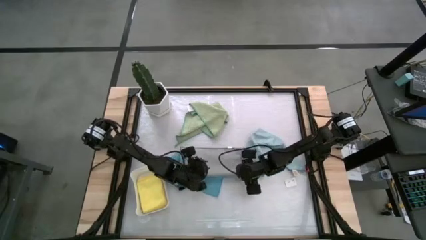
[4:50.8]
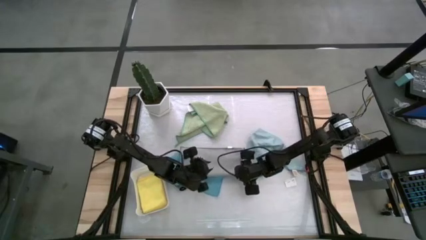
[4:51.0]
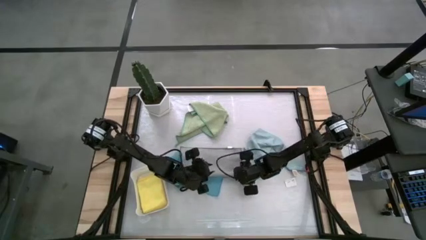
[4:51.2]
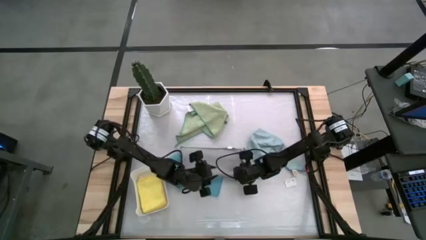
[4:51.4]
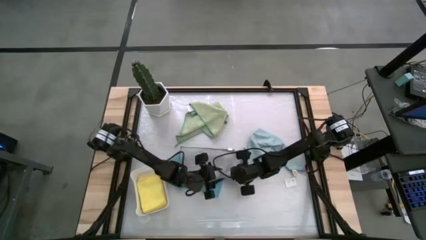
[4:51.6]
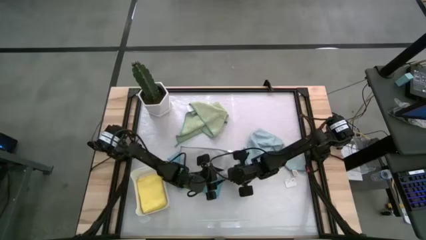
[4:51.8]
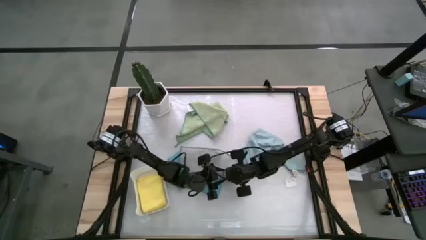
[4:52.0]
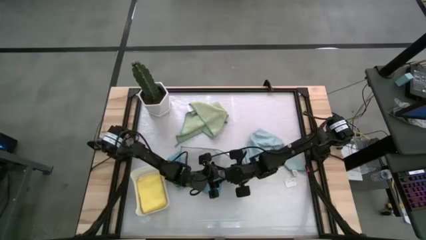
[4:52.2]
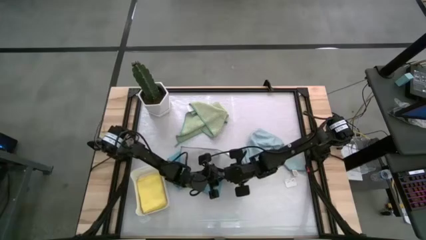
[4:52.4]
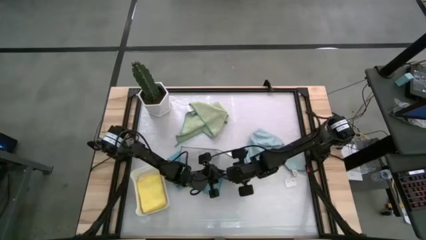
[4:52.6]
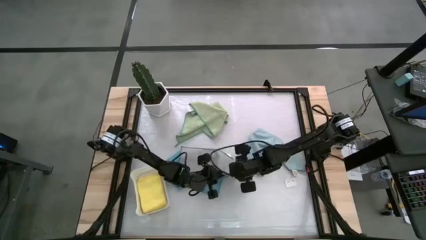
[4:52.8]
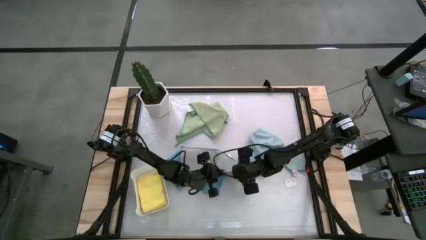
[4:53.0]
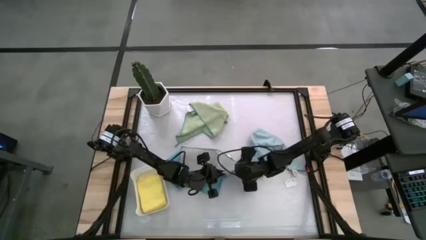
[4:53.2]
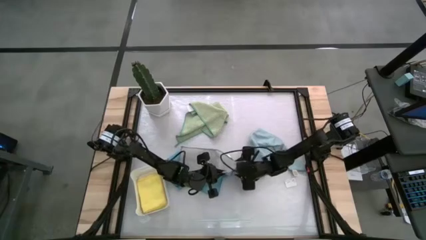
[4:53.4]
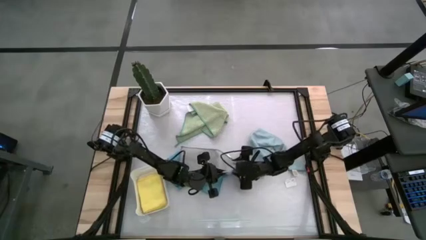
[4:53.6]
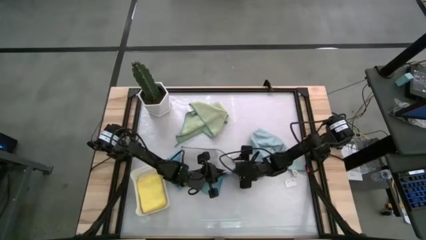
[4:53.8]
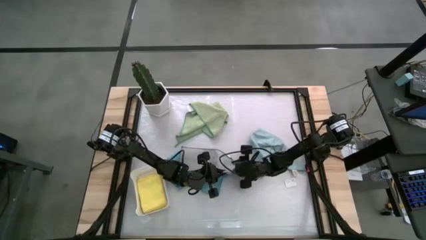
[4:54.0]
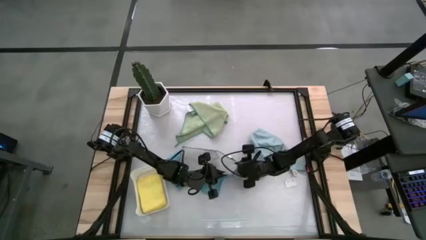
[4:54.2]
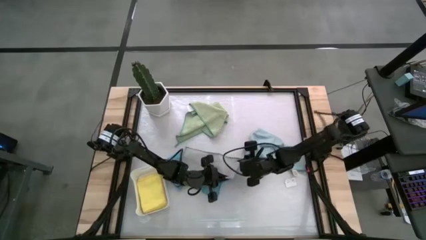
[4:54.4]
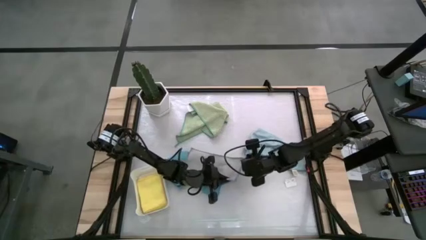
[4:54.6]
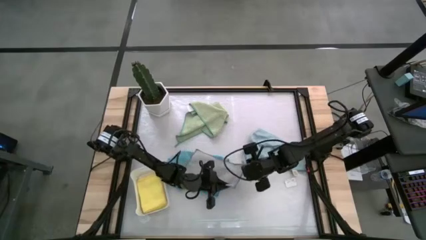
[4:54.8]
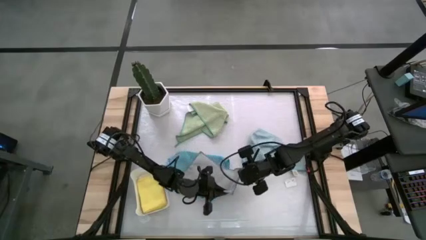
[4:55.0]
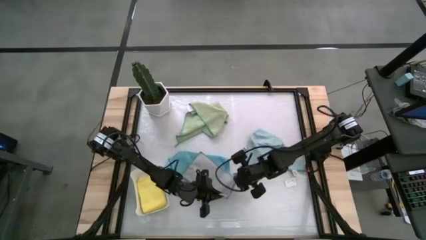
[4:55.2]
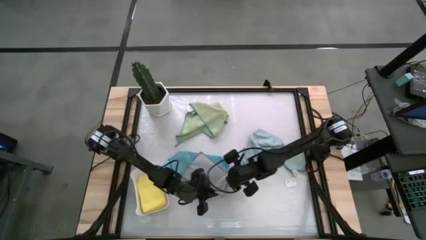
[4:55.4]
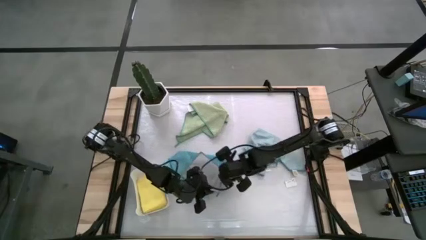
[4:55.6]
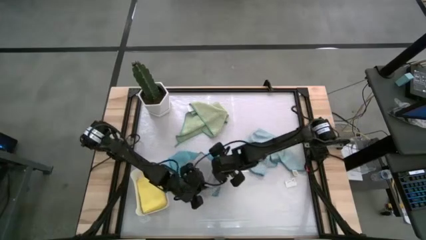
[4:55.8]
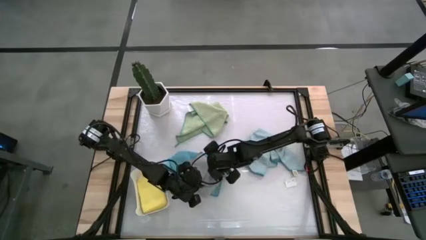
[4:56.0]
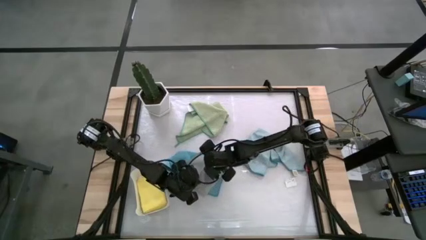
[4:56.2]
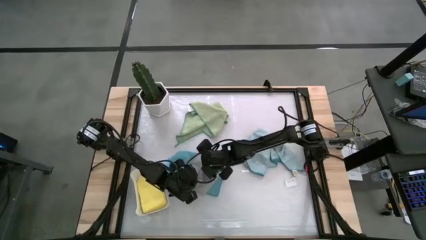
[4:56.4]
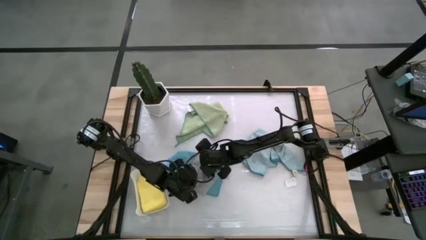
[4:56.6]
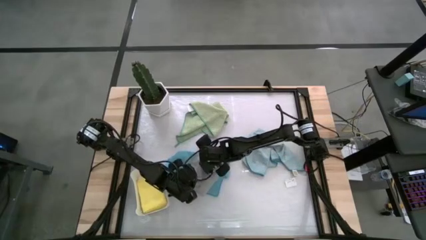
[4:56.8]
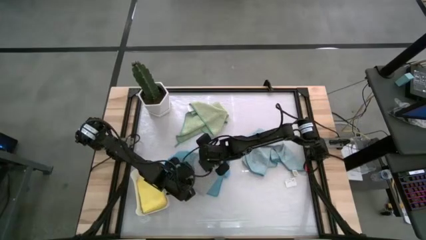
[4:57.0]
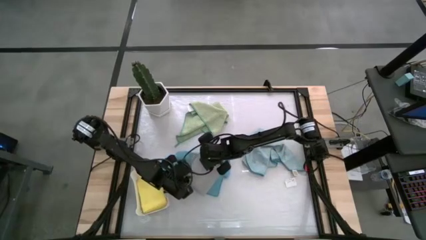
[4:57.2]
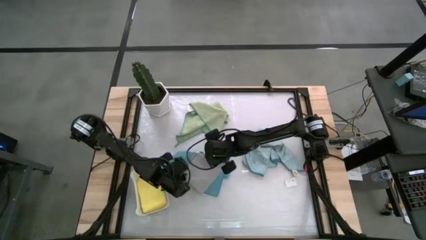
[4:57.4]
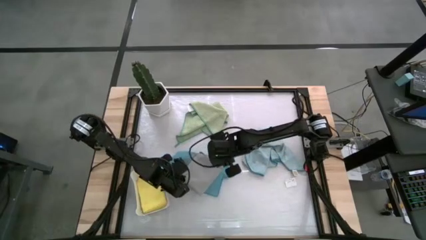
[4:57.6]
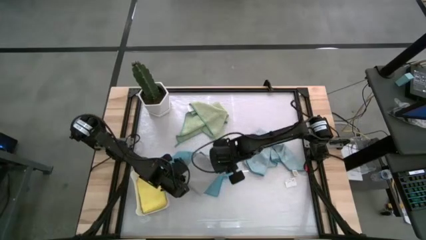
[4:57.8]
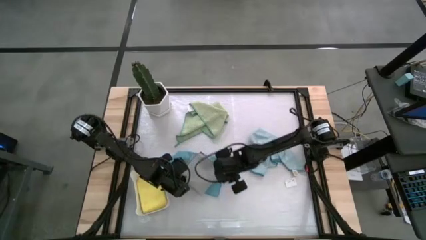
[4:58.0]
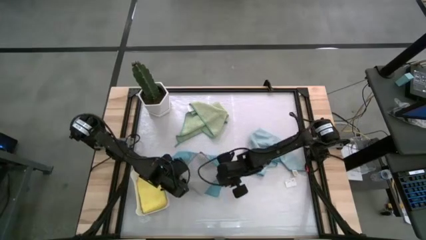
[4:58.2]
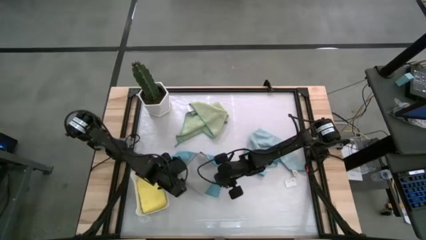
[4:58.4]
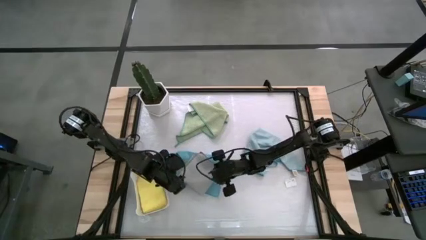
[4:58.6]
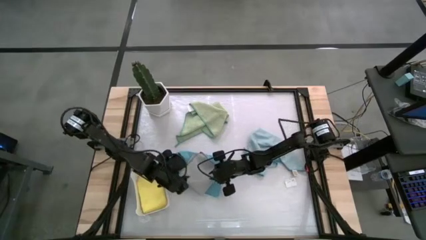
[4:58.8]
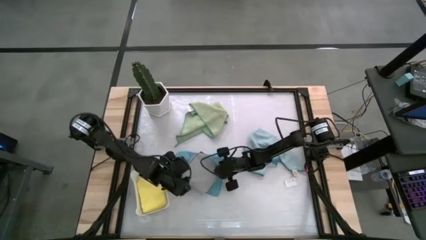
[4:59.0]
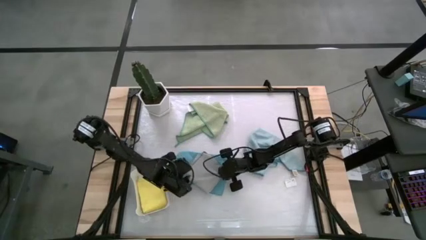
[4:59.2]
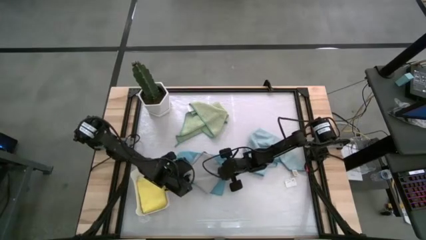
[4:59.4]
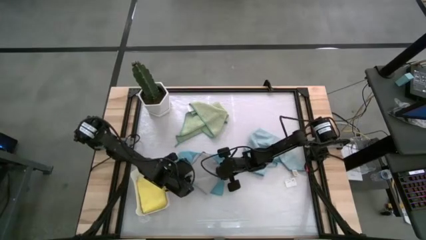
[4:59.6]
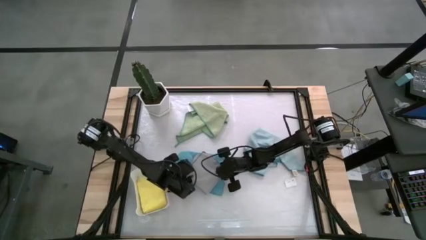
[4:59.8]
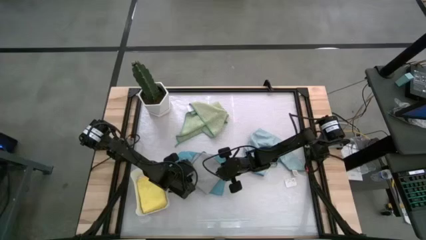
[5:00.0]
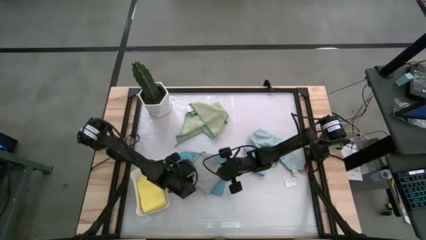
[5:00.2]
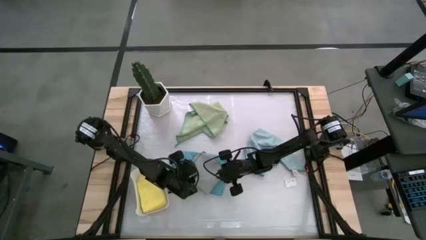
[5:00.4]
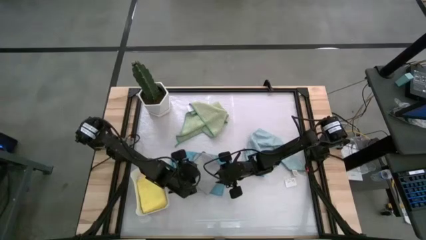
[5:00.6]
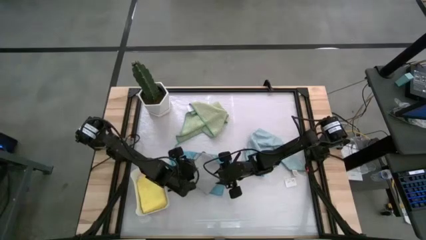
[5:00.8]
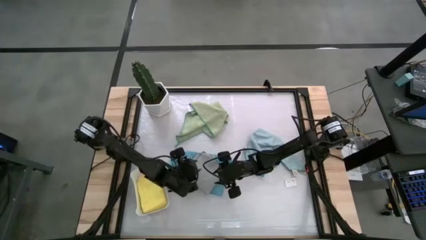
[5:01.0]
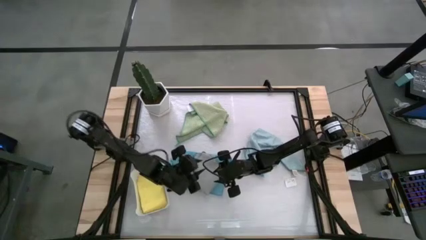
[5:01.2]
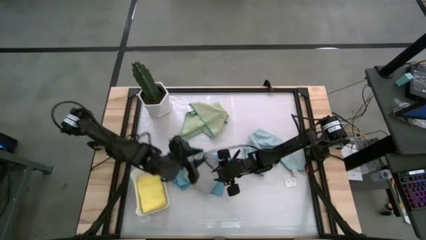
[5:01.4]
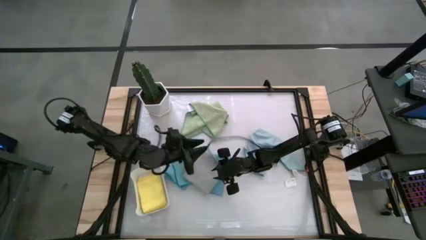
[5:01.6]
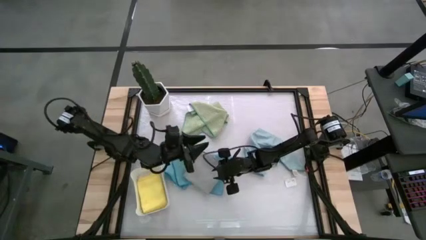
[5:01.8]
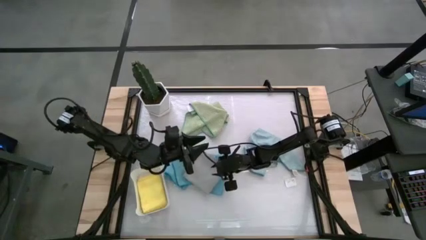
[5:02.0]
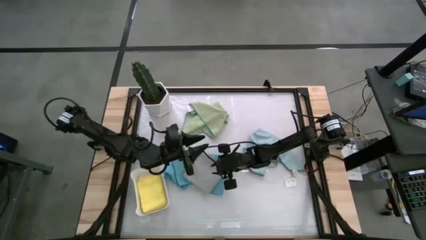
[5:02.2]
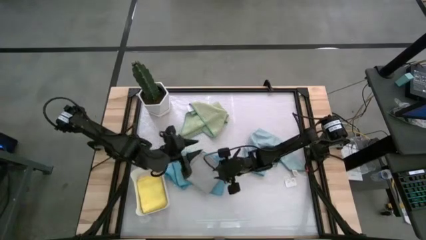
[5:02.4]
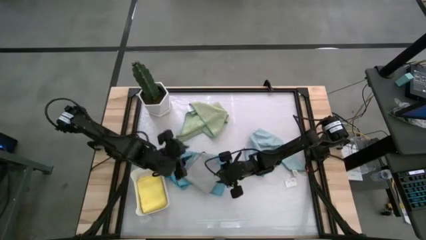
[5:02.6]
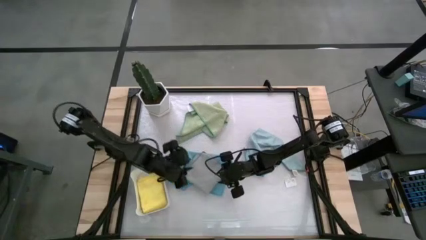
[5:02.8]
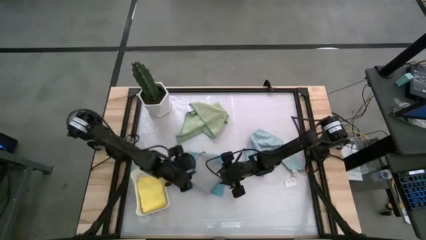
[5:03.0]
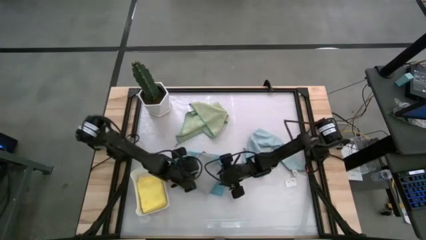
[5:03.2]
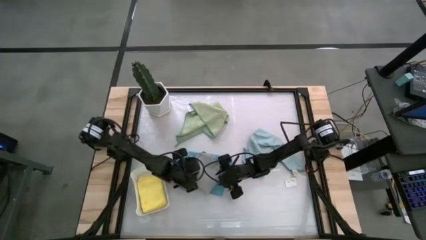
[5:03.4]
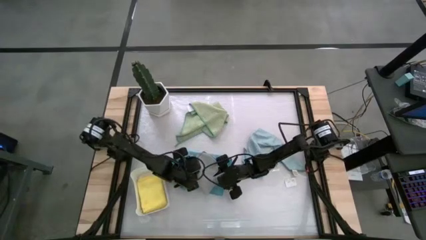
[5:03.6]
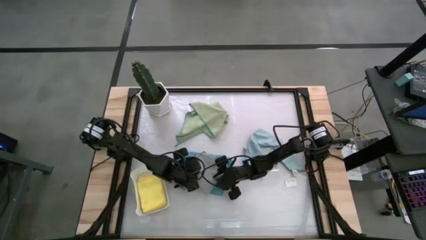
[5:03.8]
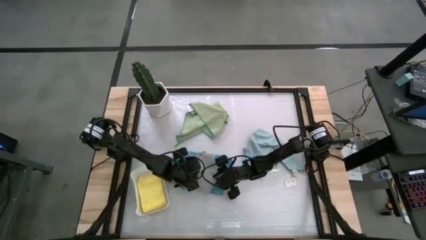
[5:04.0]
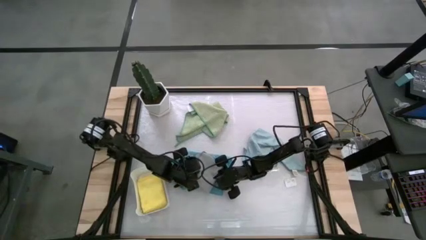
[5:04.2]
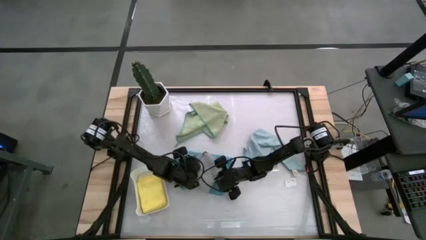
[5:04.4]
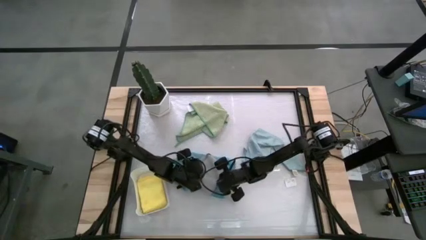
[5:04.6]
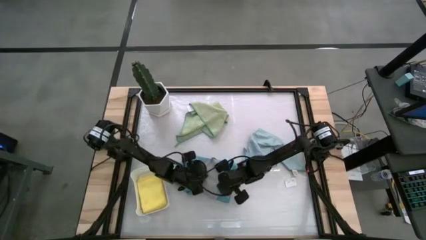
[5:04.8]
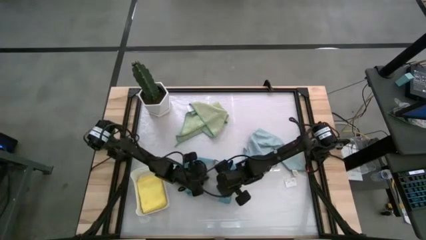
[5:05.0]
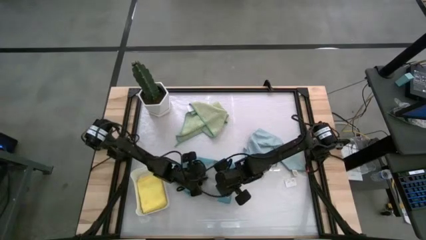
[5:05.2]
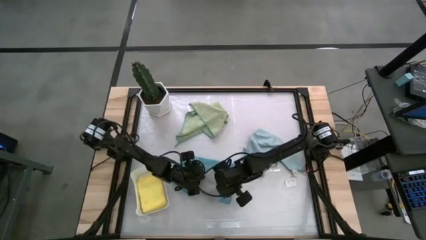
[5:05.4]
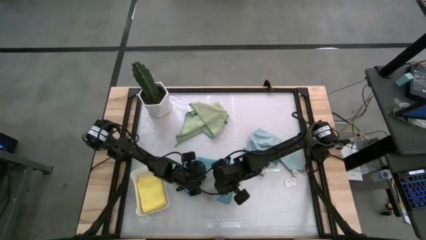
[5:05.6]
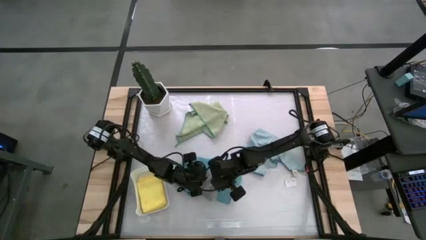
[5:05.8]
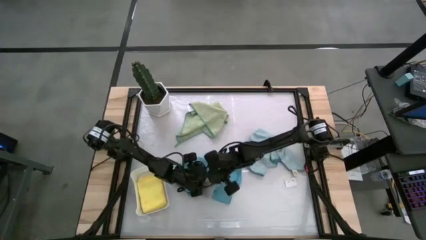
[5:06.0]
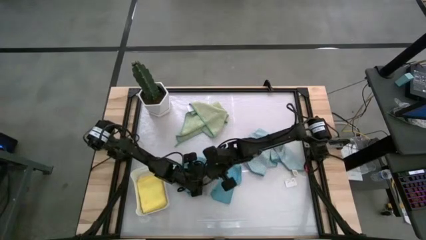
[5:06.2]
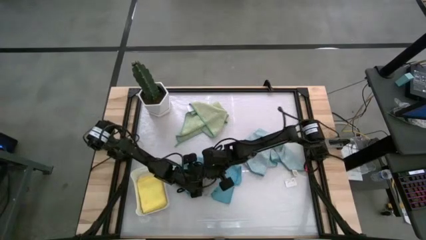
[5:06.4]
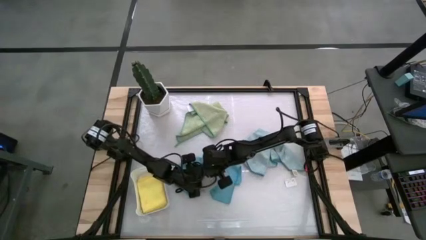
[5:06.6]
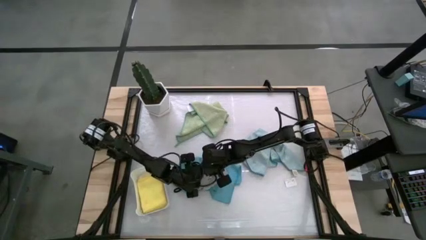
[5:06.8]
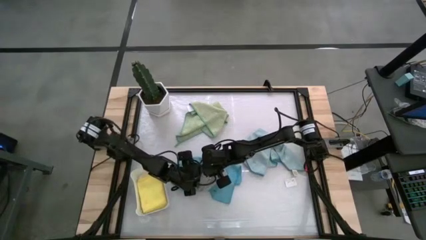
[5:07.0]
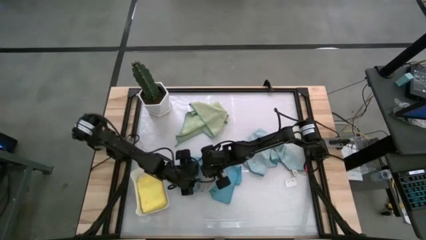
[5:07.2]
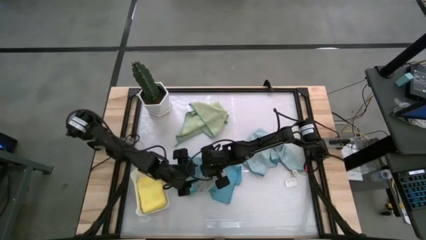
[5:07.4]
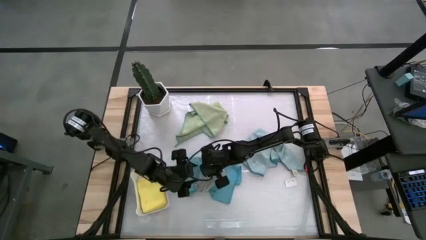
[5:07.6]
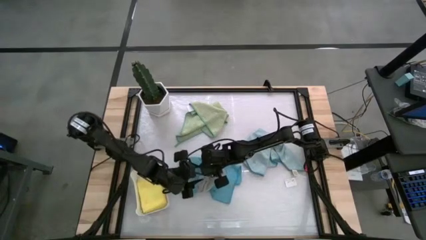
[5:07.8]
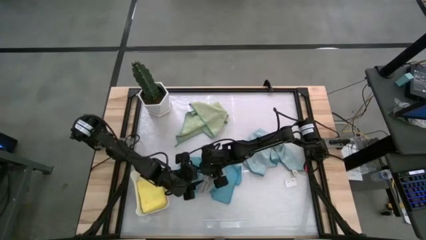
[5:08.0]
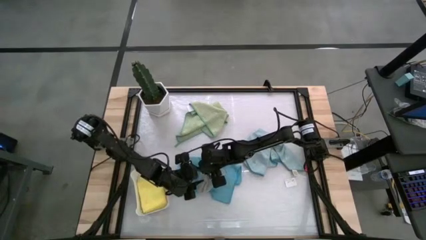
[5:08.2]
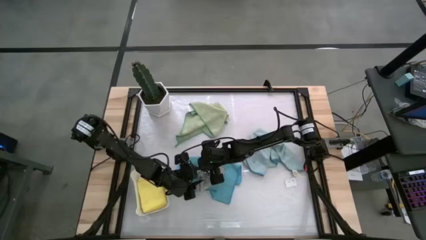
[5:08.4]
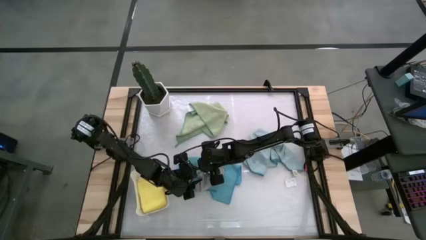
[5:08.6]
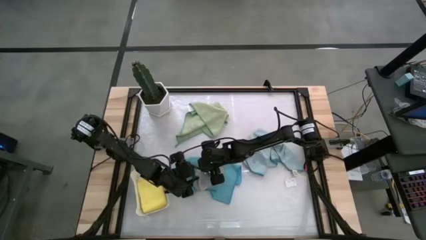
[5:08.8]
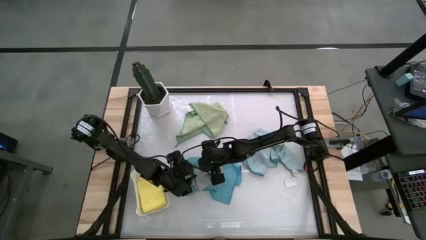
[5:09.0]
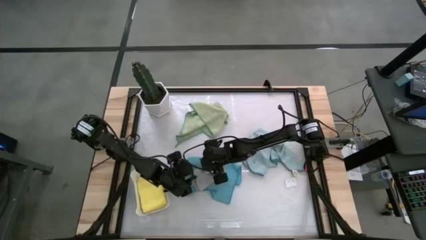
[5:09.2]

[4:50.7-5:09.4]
Task: Fold microfiber towels
Fold the gray microfiber towel
